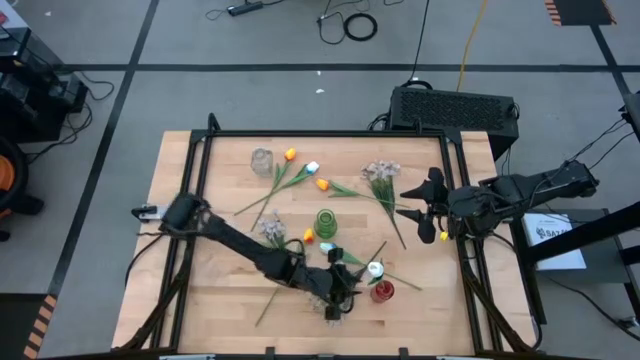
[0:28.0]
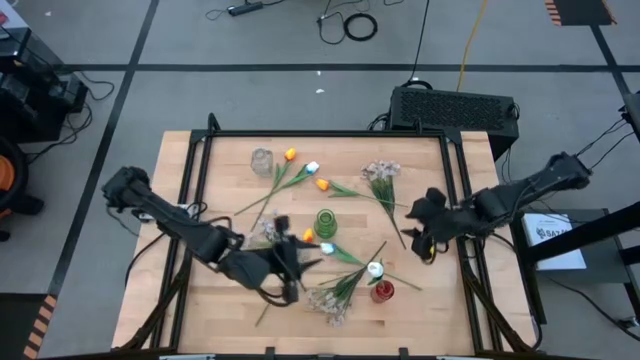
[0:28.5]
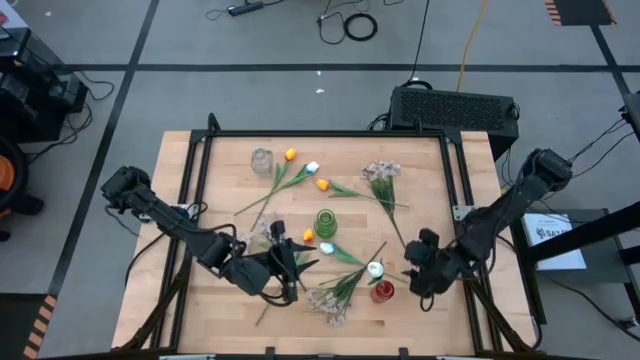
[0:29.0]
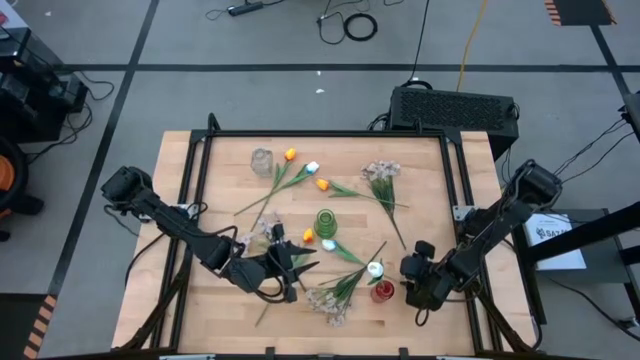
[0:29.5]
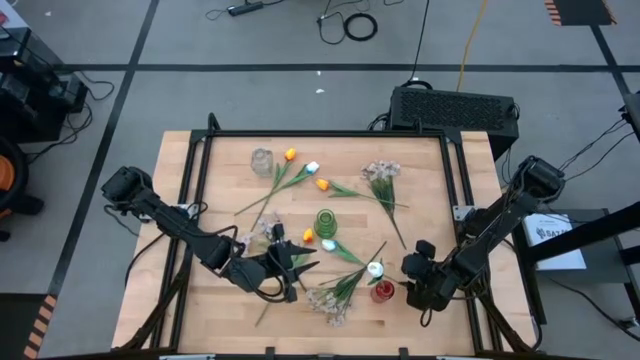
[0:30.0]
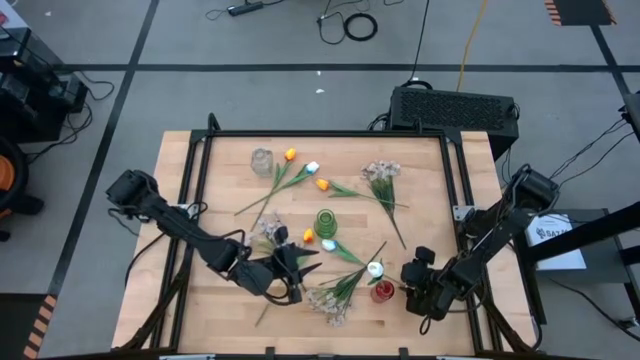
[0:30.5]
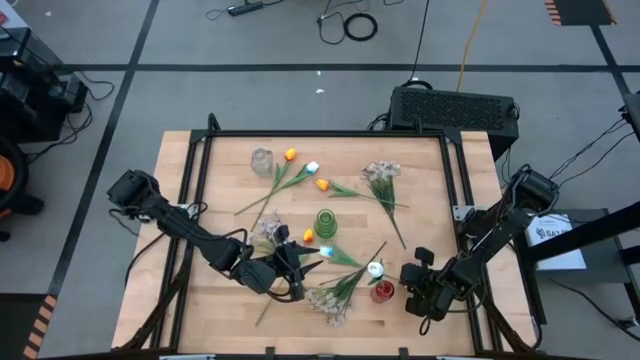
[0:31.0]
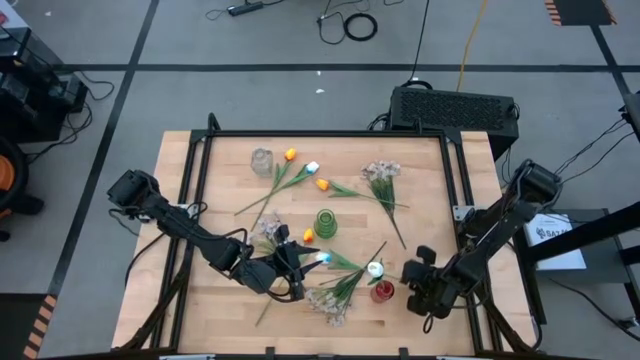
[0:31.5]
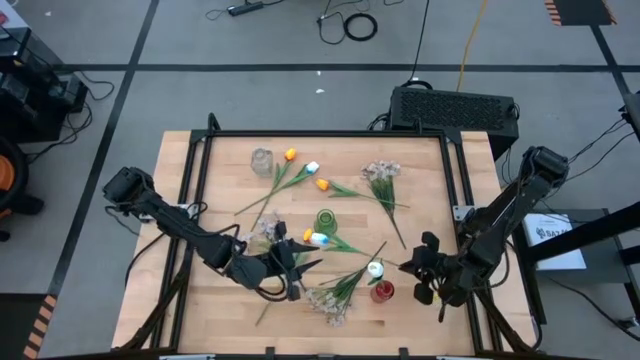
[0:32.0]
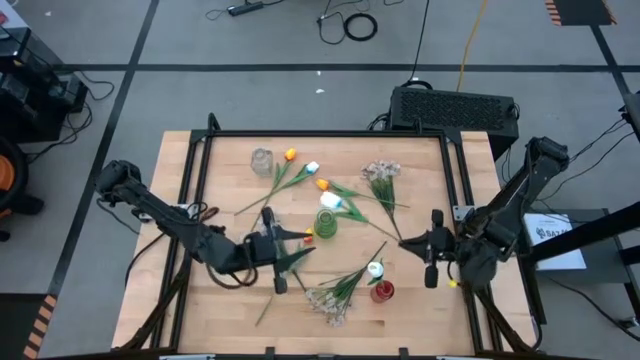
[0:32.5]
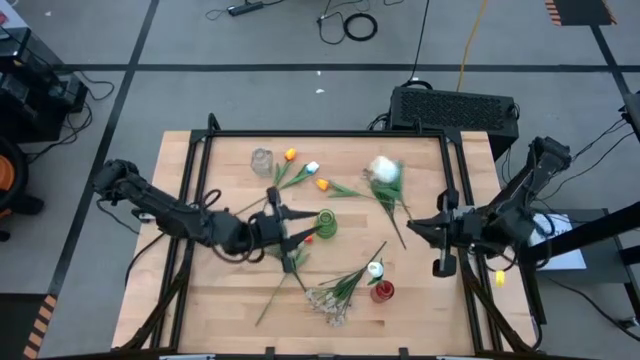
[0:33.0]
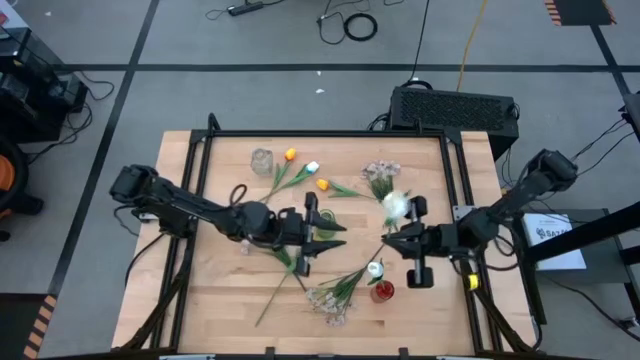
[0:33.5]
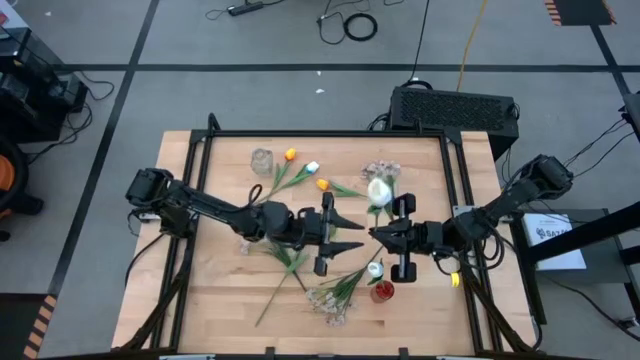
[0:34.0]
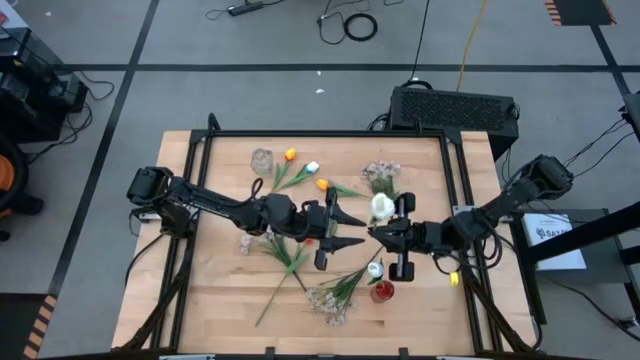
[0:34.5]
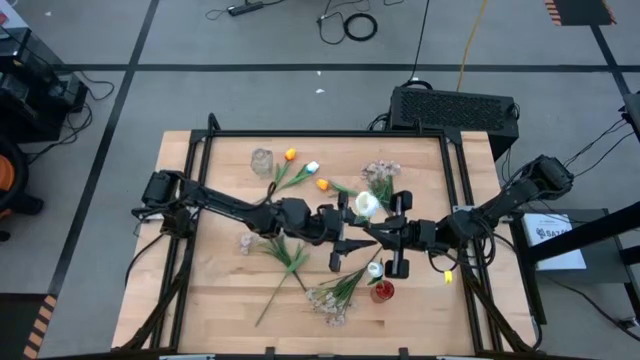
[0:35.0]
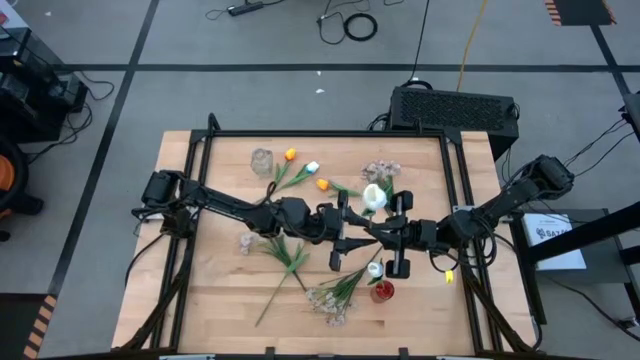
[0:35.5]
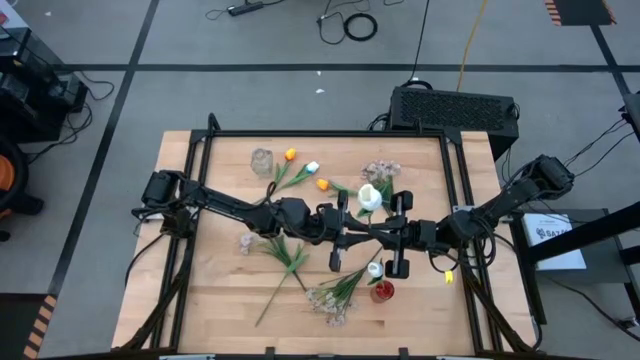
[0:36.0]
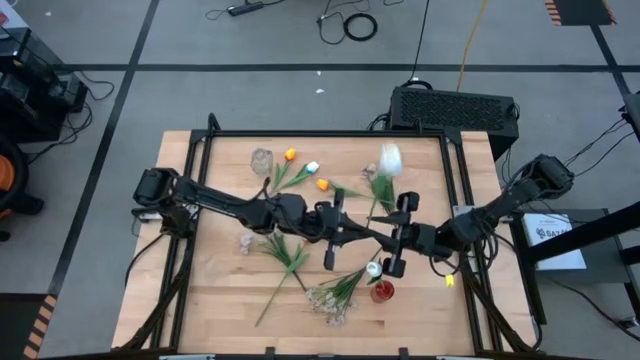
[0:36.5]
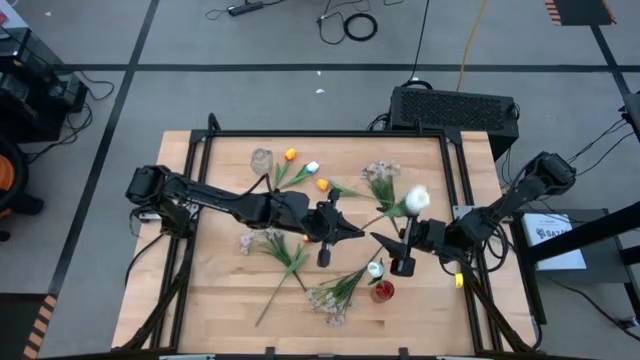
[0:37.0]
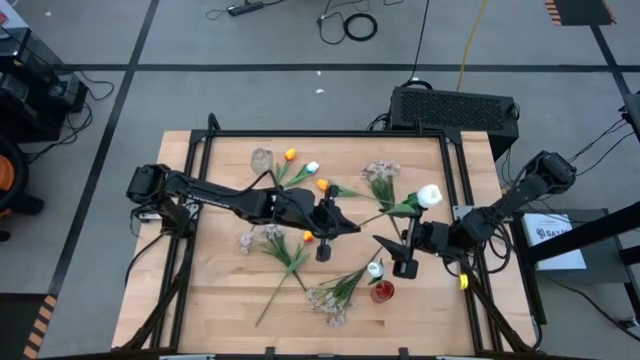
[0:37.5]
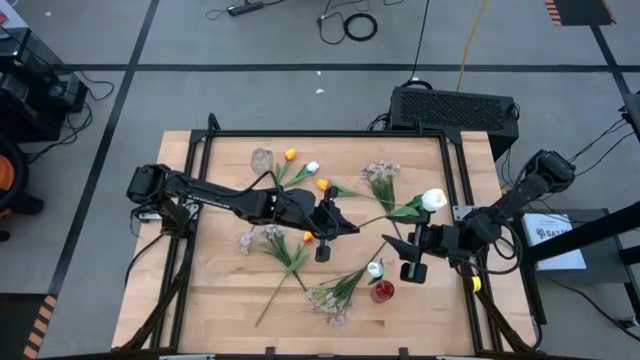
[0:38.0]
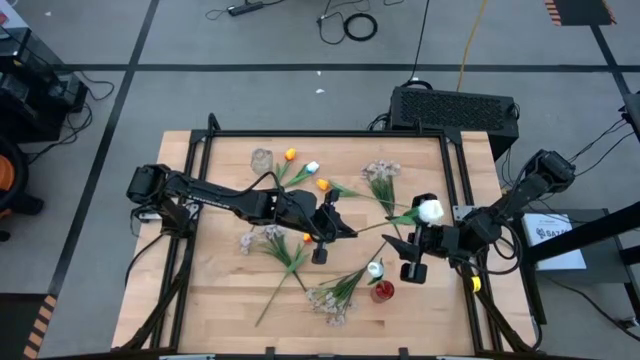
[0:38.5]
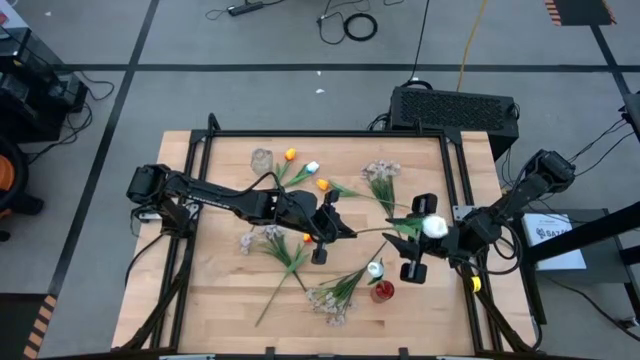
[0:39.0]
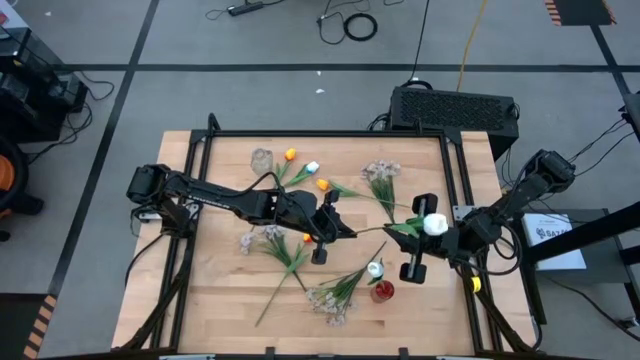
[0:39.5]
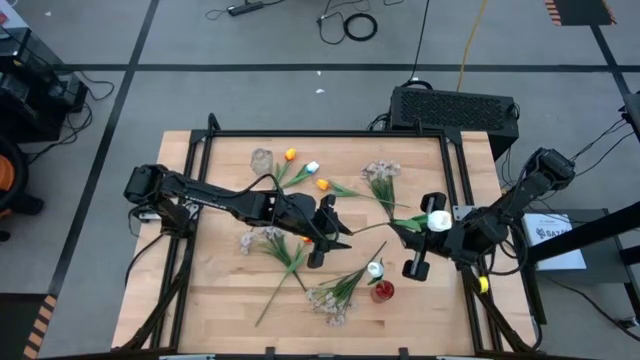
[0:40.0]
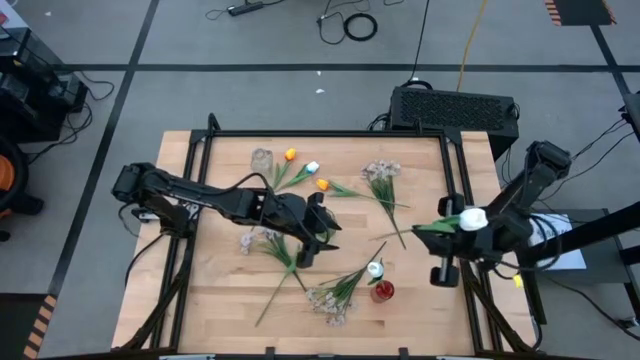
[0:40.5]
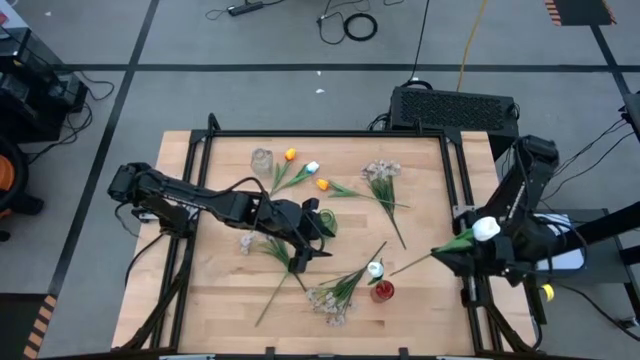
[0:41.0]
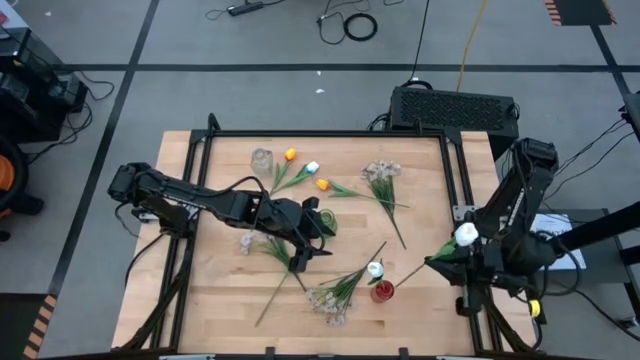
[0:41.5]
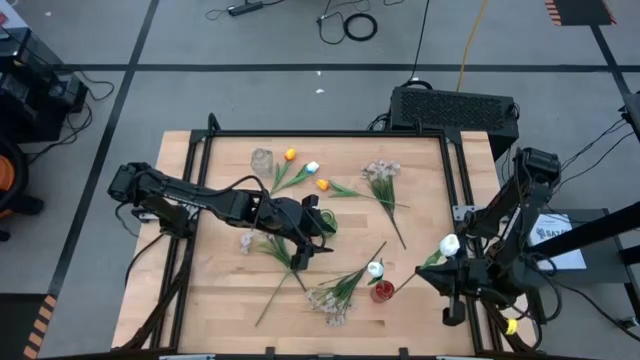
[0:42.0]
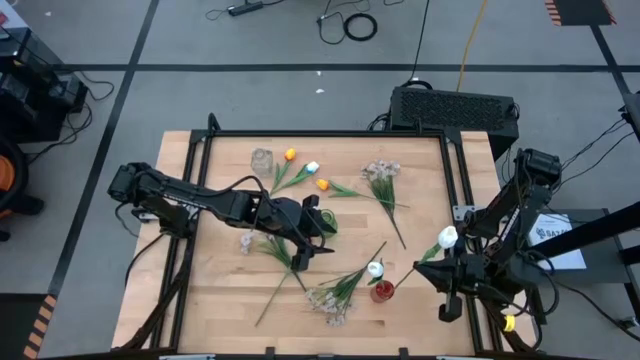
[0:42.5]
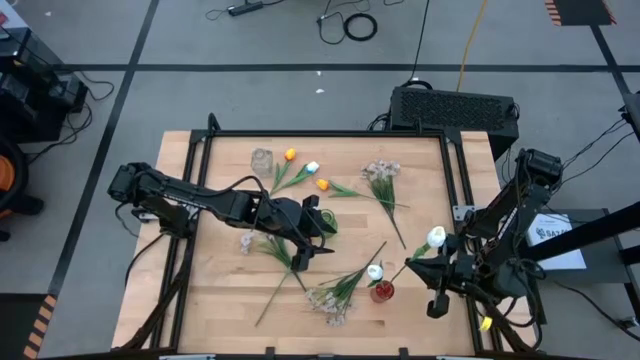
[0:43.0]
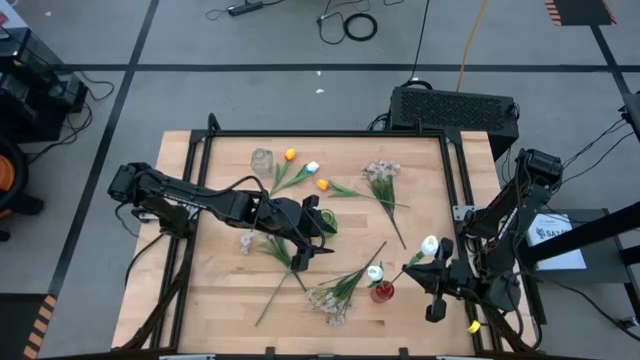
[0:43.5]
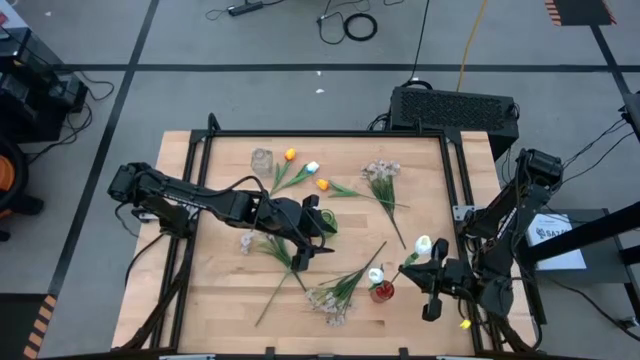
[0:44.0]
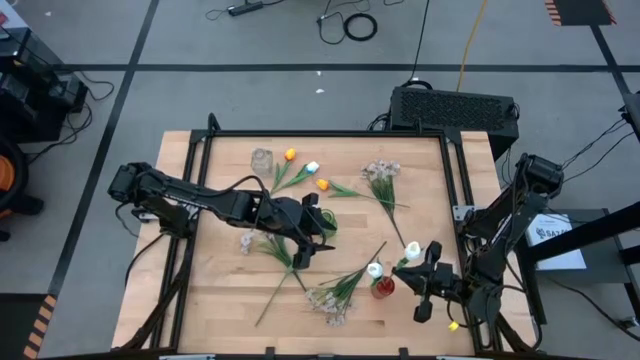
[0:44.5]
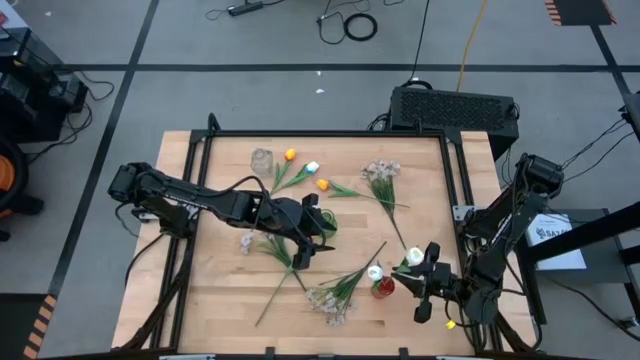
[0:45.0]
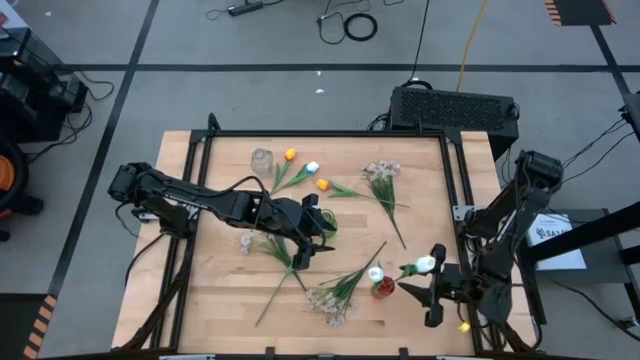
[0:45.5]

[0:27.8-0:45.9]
Task: Sort flowers into vase by color
Put the bottom white tulip into the red vase

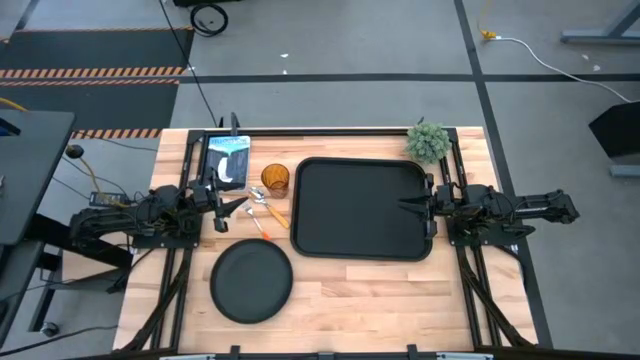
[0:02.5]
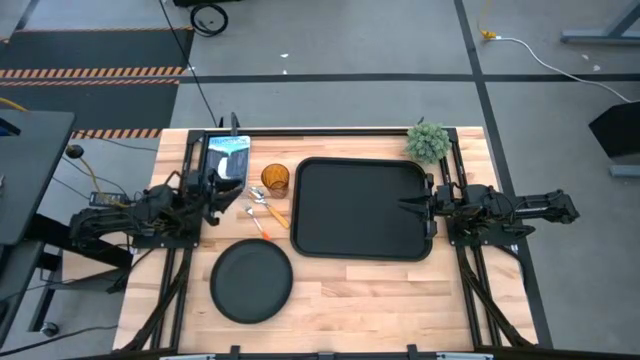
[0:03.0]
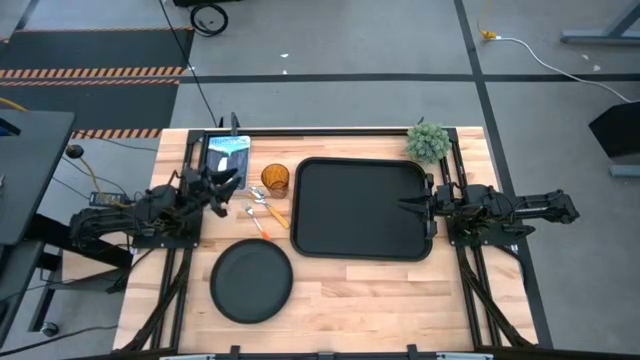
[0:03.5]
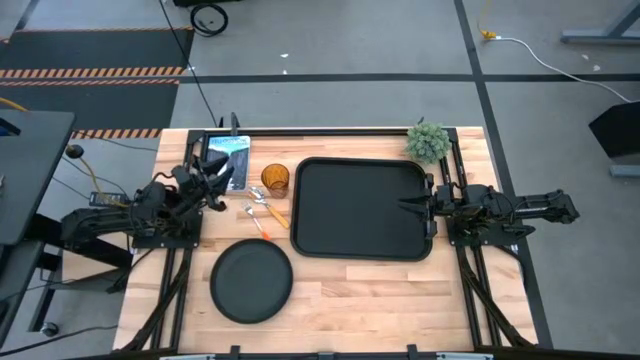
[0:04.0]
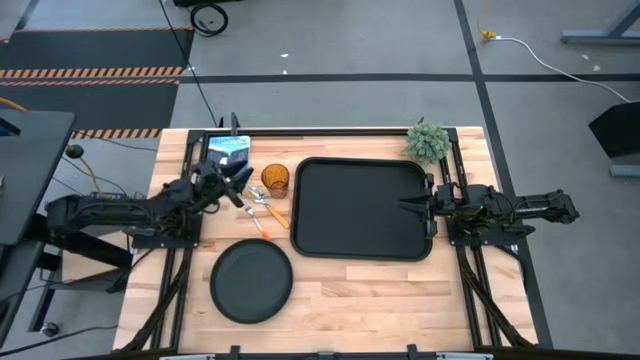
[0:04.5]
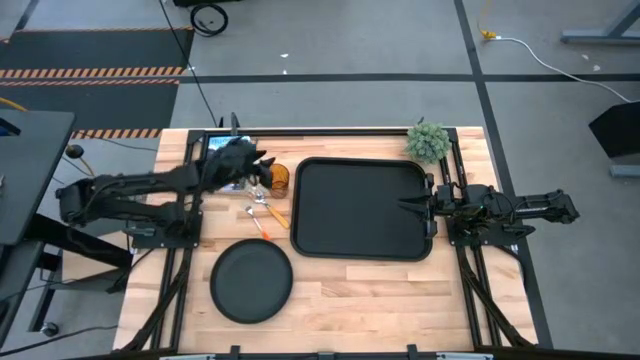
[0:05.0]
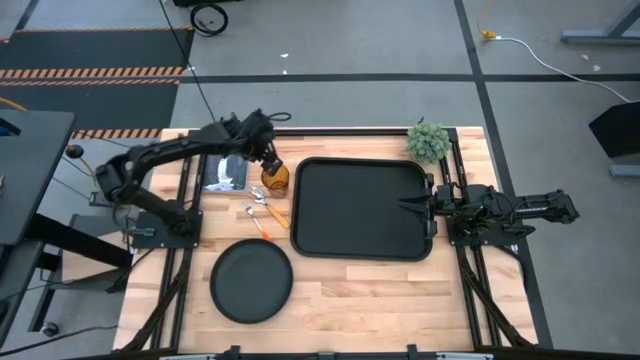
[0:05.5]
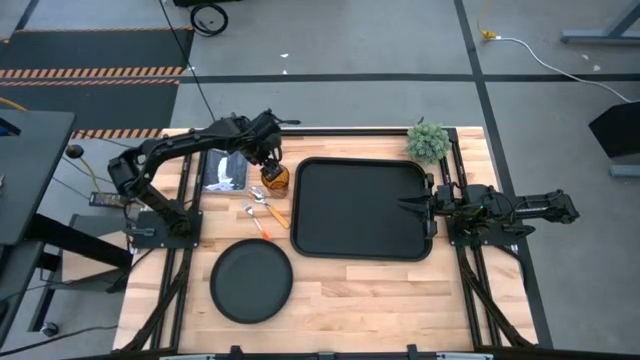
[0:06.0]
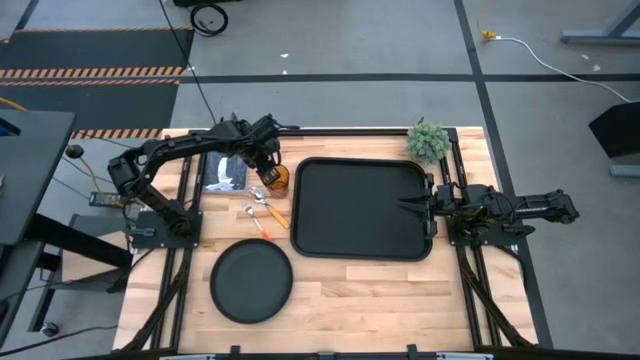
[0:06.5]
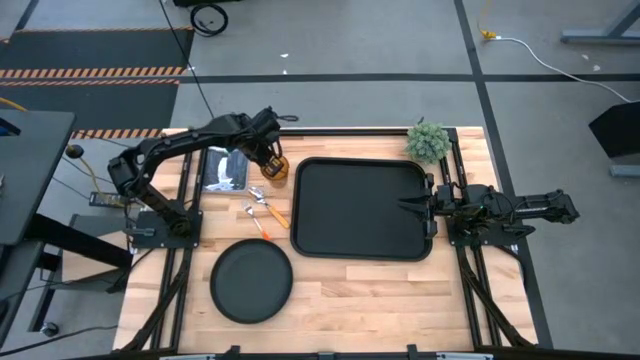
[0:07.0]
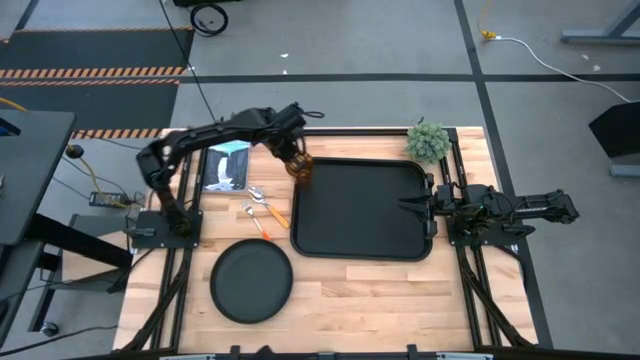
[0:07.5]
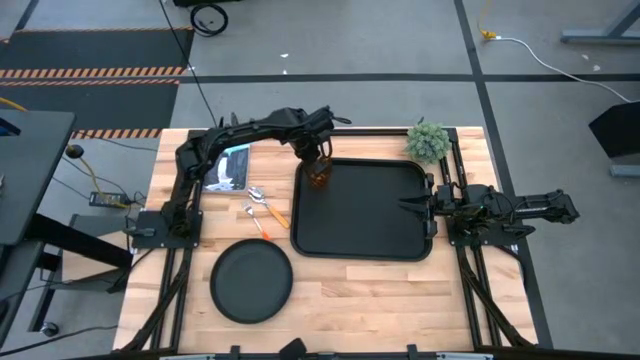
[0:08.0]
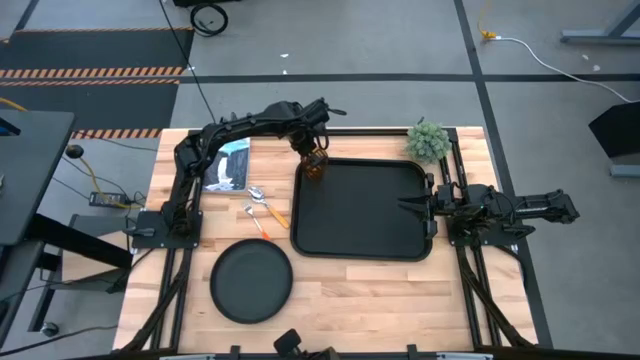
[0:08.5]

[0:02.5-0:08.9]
Task: Pick and place plate/cup/fork/spoon on tray
Put the orange cup on the top left of the black table tray
